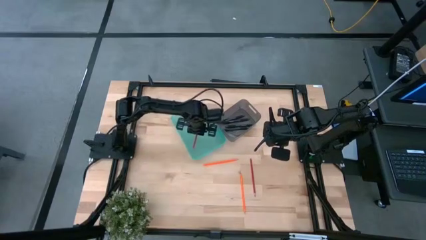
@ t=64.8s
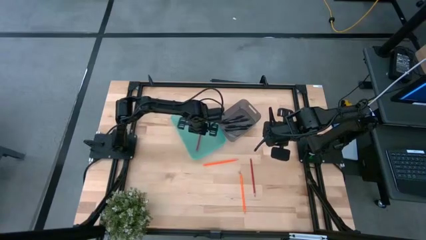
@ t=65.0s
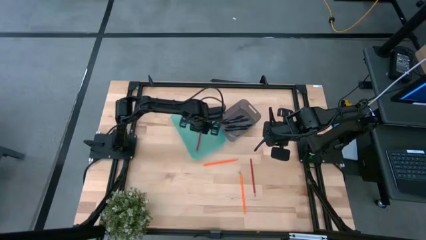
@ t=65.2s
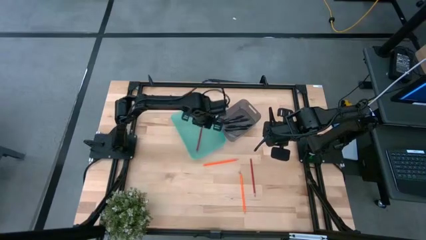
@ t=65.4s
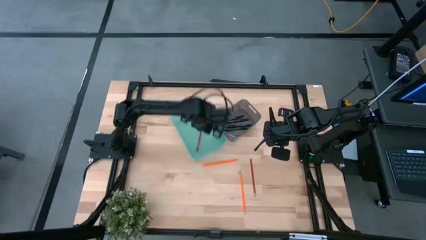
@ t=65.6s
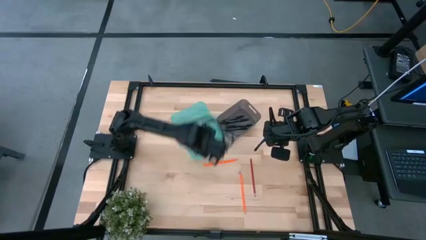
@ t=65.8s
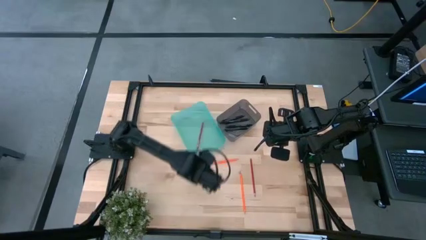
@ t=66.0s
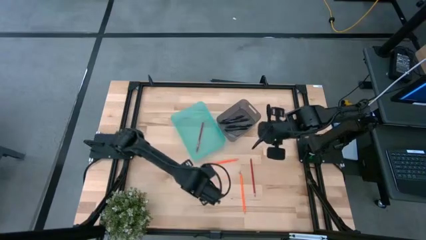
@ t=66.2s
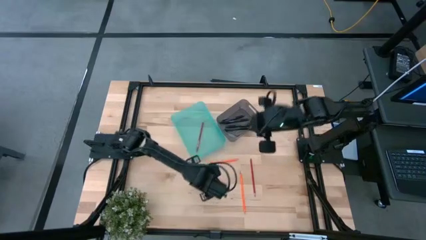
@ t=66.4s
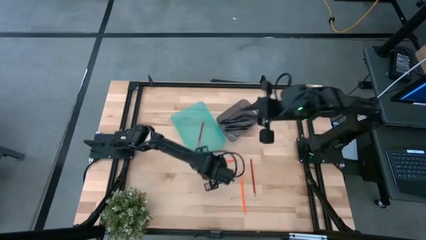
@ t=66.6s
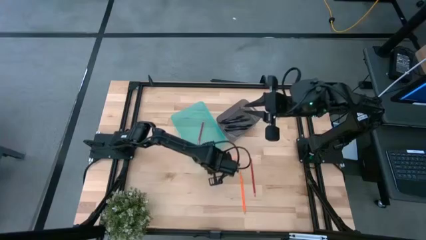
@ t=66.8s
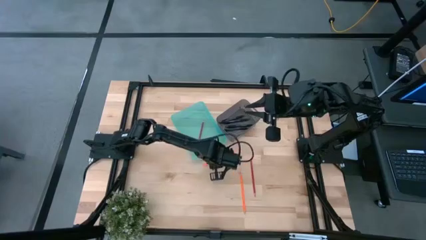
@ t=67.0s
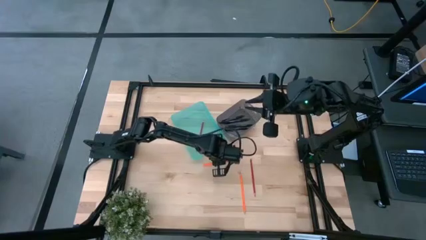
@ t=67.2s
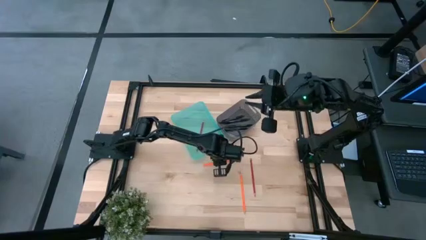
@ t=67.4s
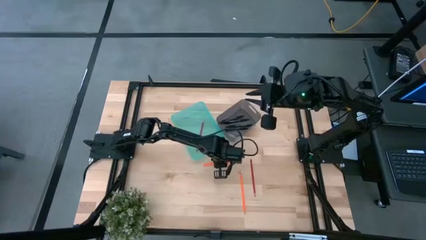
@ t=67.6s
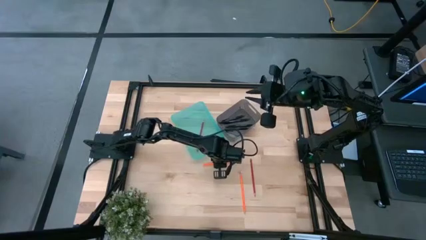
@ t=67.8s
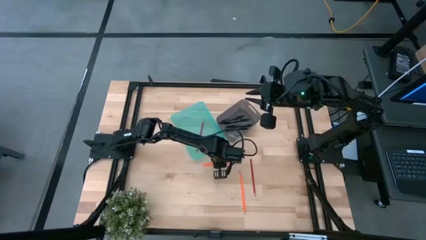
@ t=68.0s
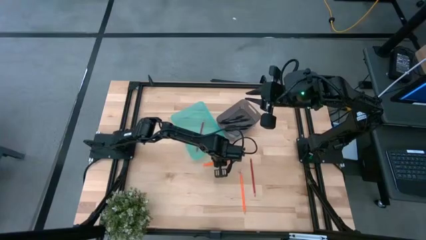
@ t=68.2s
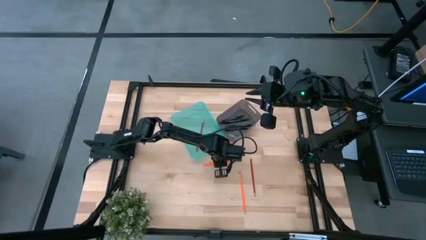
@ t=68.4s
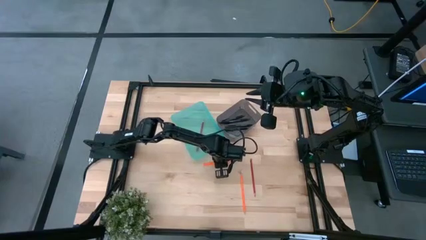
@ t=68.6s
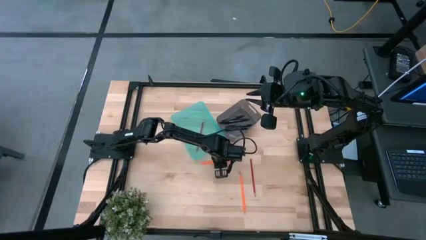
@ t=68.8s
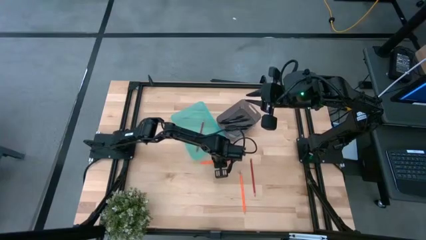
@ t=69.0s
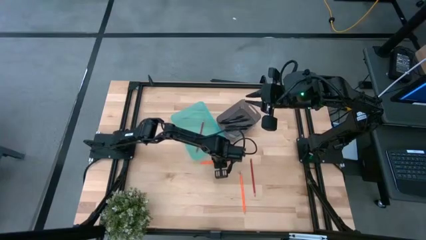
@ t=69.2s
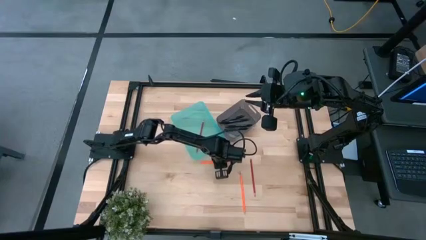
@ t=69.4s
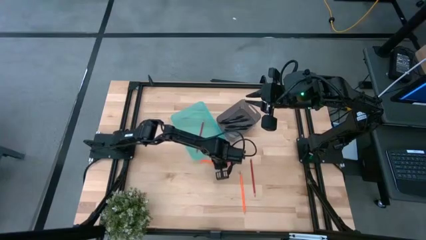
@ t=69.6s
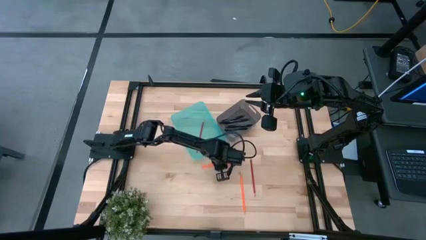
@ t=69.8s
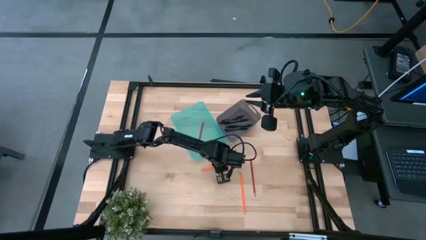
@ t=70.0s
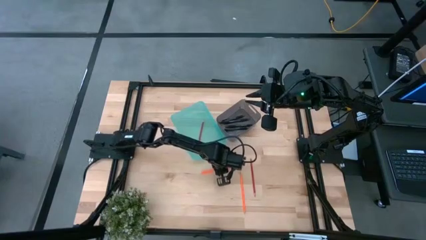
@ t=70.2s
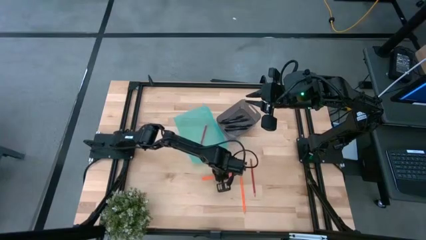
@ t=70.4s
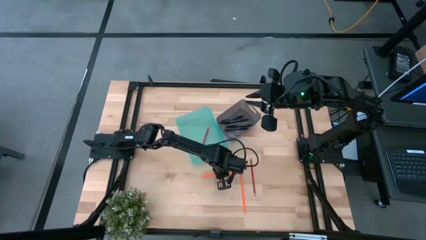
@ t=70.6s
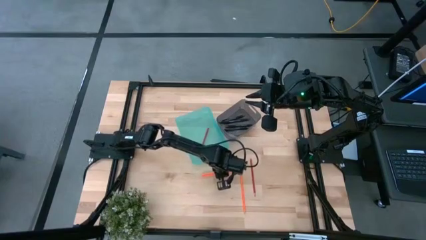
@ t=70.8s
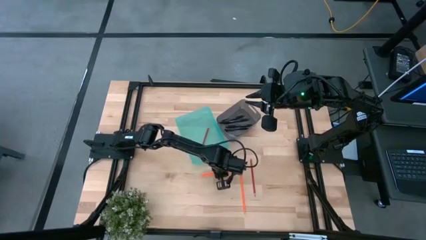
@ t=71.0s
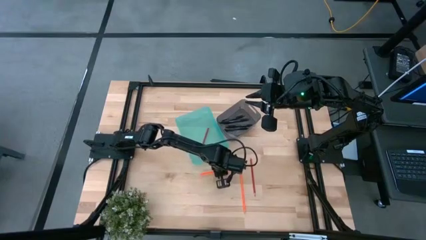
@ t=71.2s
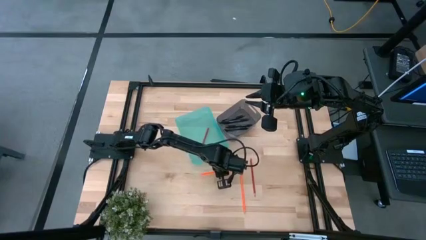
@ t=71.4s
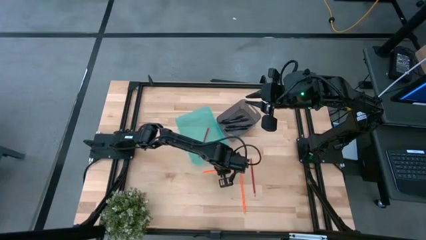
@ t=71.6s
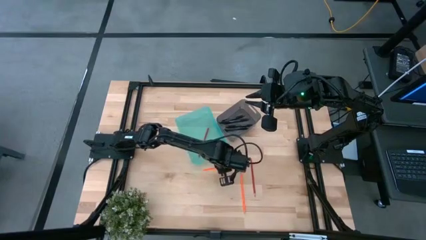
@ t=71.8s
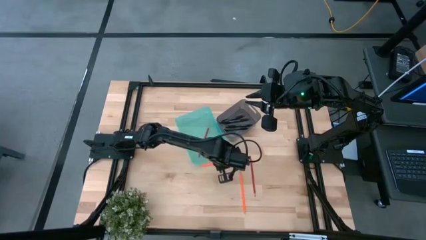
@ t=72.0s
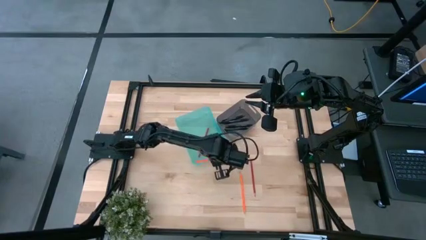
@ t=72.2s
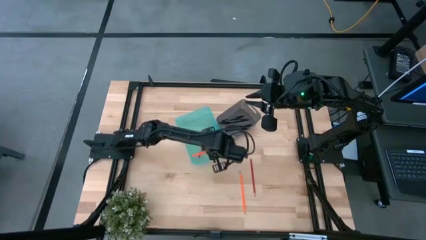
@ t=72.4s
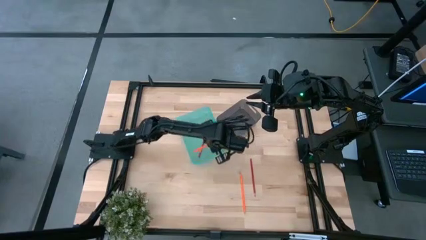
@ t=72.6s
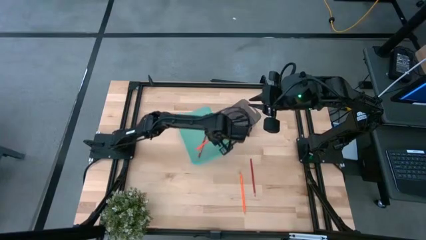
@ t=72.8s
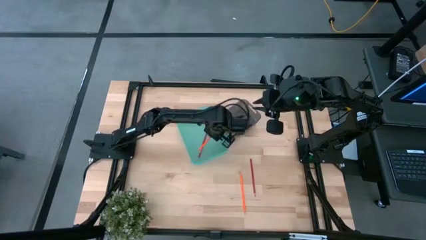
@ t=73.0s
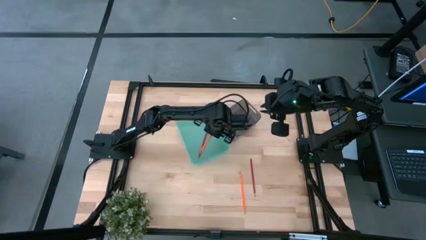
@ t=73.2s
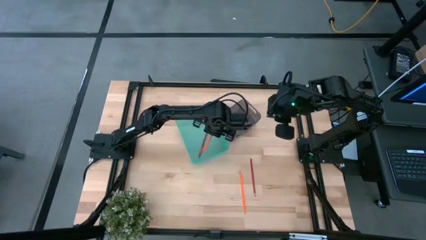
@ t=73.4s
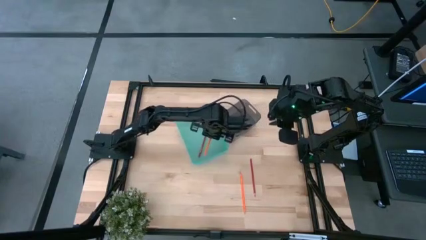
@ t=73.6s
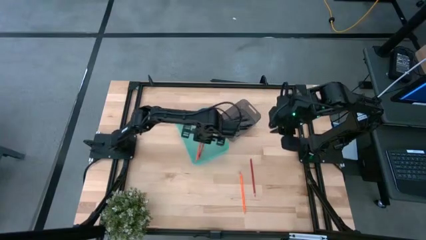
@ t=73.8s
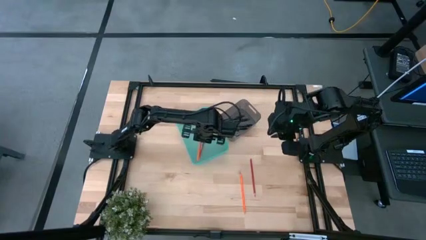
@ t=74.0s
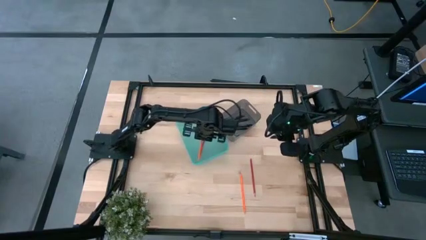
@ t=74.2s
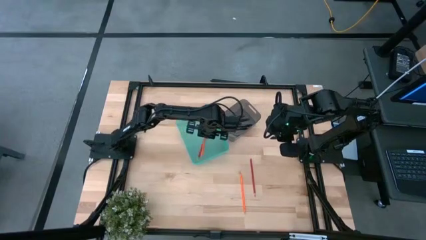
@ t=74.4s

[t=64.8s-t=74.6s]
Task: Sort pens & pencils
Put the top orange pencil into the light blue bin

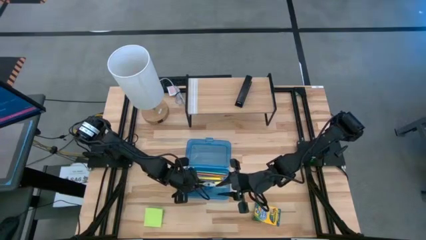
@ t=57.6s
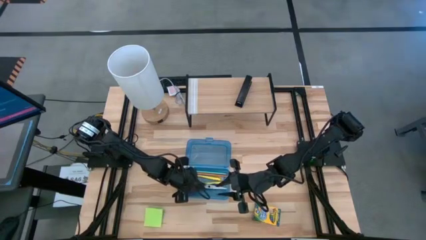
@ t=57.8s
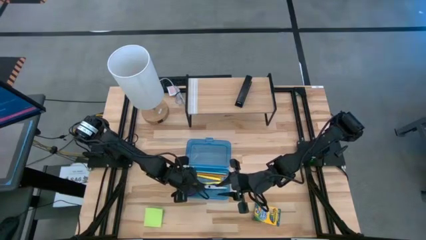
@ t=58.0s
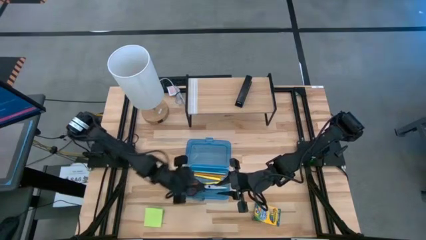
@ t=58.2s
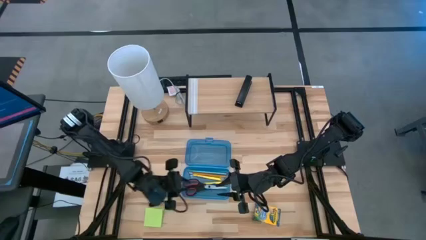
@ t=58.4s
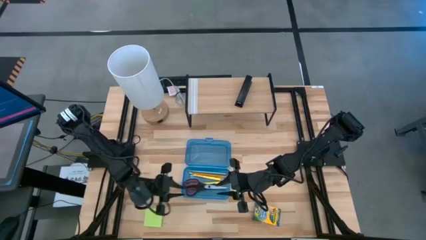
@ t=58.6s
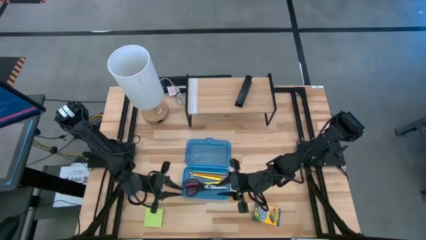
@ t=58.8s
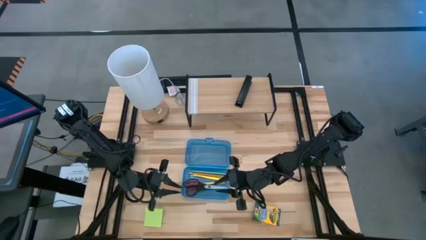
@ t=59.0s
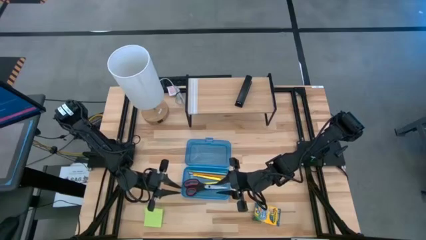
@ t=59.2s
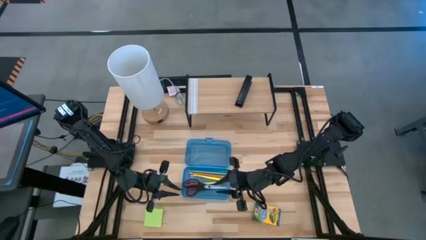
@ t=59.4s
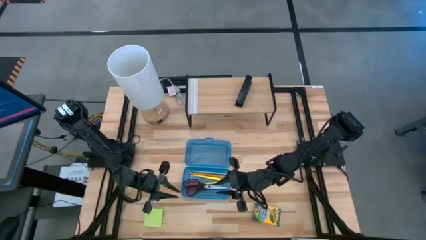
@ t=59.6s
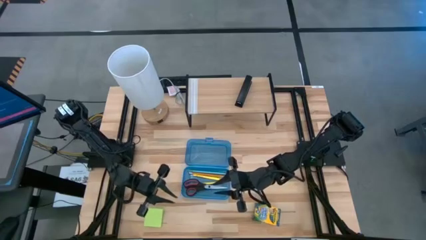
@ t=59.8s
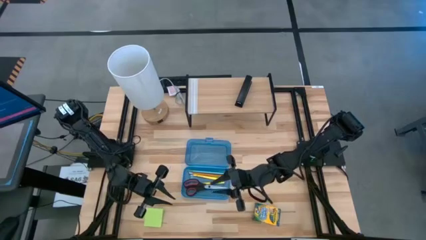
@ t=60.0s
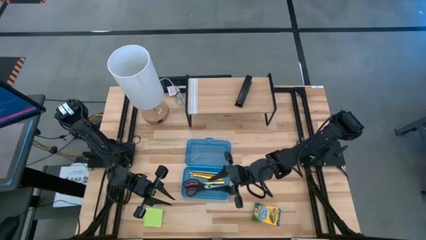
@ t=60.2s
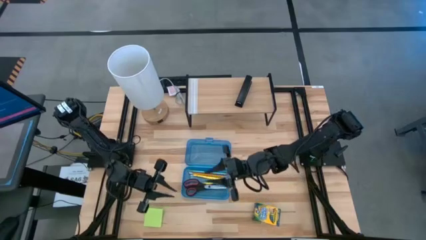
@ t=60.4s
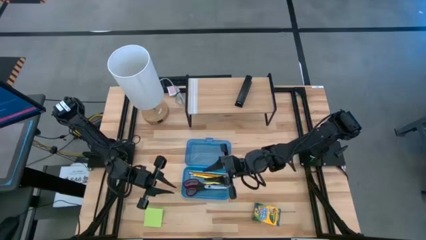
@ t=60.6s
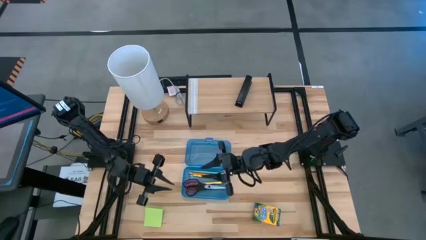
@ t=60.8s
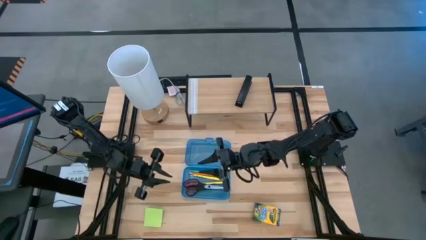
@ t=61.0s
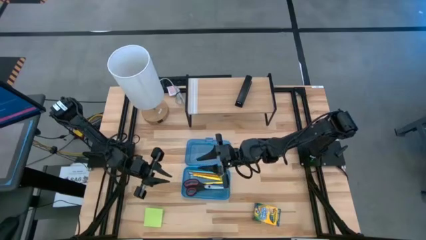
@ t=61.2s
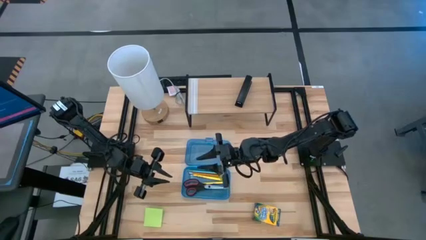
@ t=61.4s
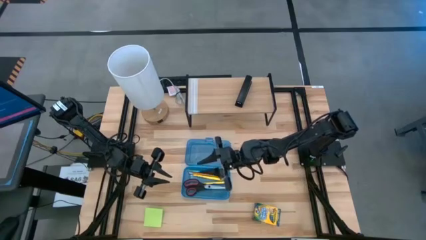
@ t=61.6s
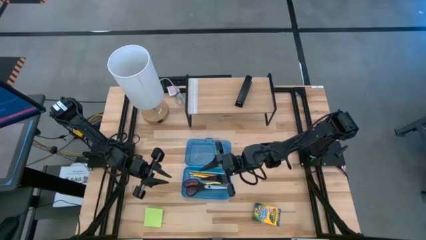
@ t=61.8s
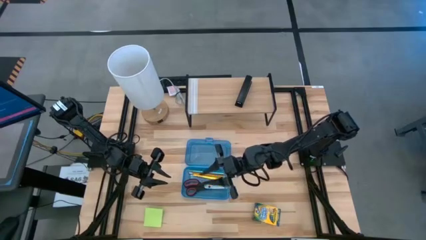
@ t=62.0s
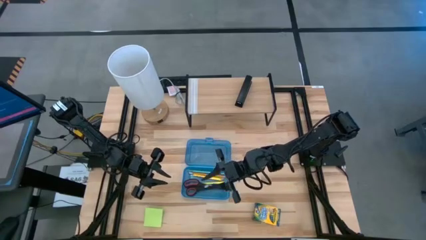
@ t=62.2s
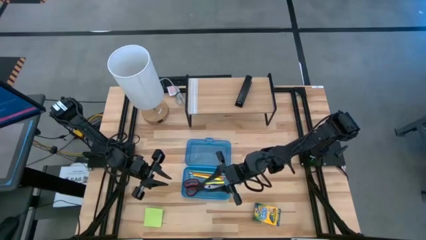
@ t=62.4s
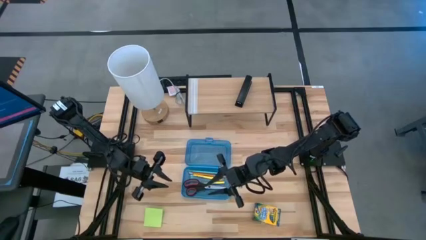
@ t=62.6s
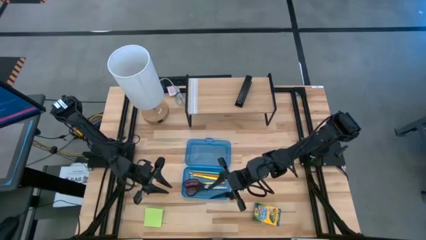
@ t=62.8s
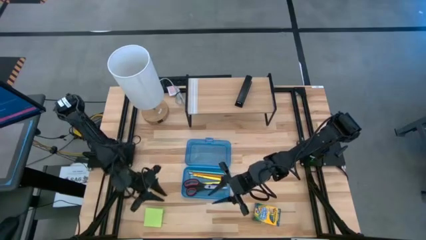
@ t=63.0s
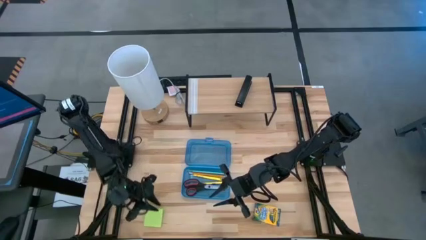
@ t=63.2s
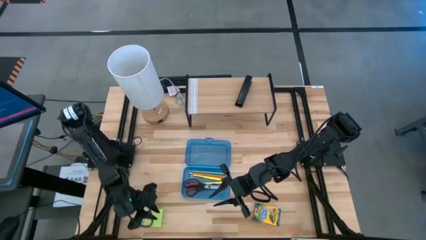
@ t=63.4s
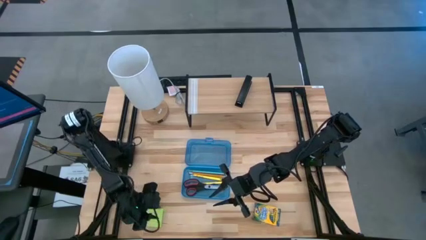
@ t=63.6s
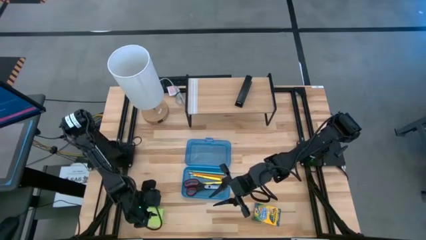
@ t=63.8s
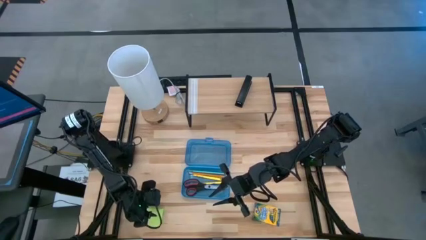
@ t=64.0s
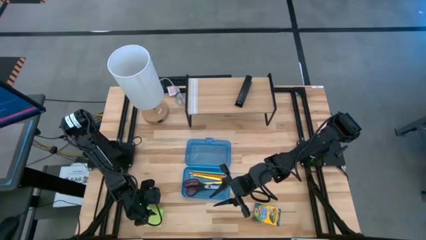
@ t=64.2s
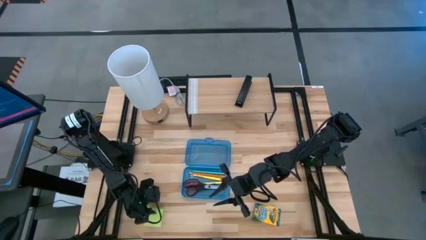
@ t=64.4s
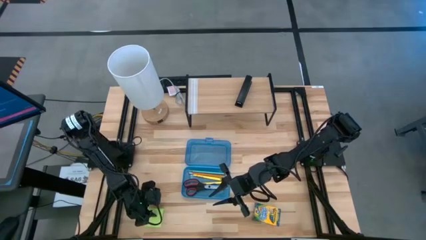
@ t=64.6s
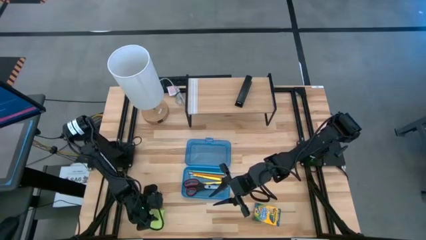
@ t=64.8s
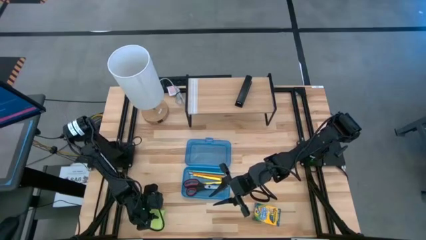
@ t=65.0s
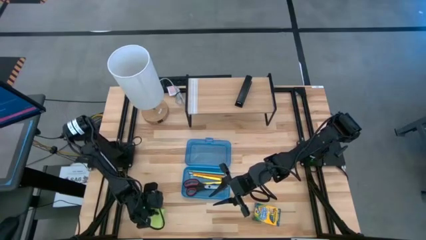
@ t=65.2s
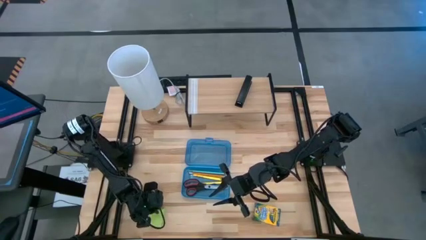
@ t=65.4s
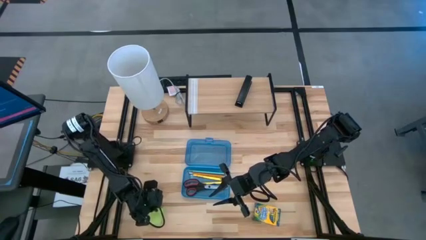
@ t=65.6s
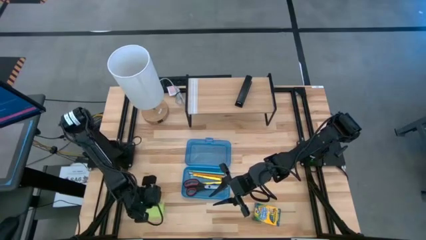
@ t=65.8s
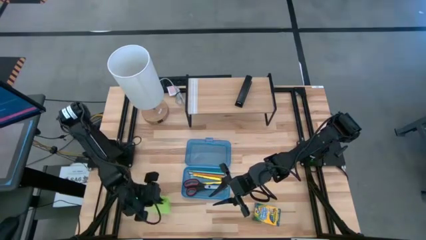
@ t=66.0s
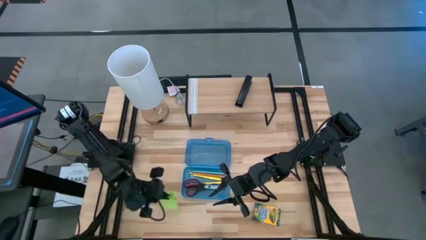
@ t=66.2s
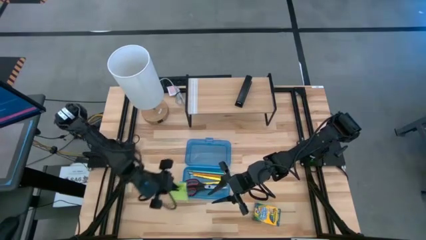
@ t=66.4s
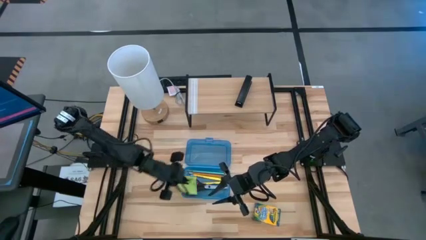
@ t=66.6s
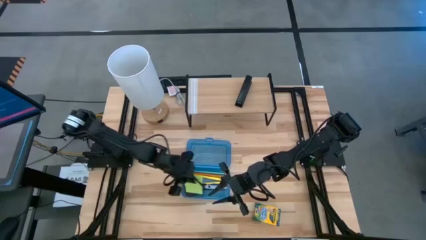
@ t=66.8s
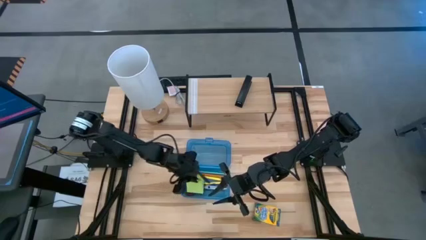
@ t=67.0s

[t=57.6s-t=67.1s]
Task: Pack school essentials
Put the green sticky note into the supply box
